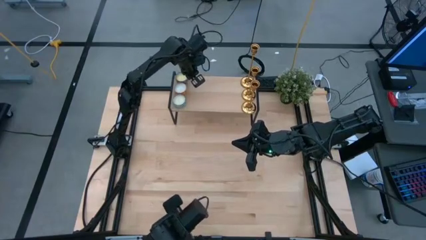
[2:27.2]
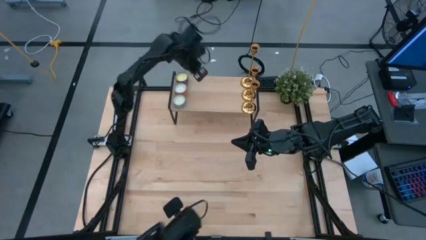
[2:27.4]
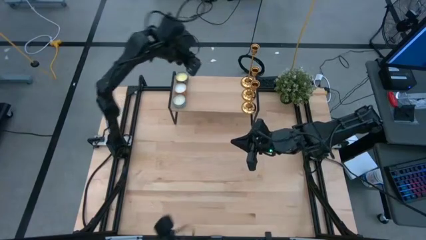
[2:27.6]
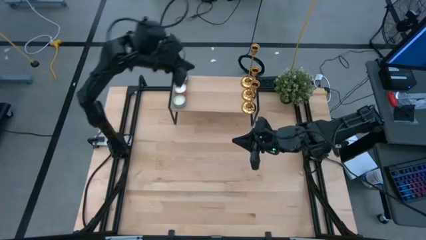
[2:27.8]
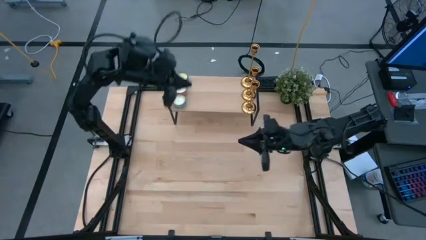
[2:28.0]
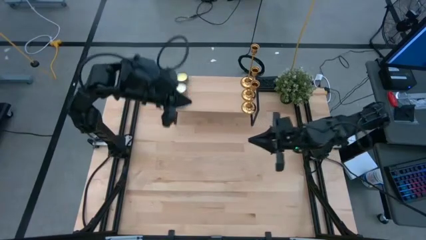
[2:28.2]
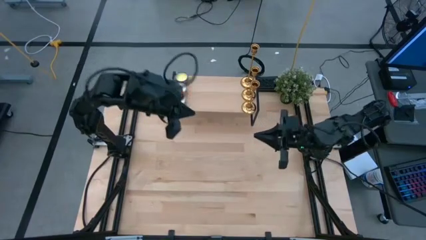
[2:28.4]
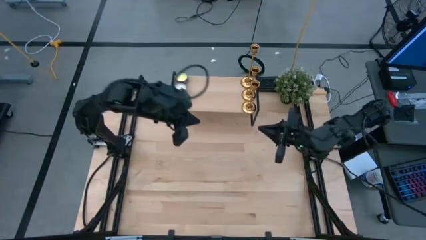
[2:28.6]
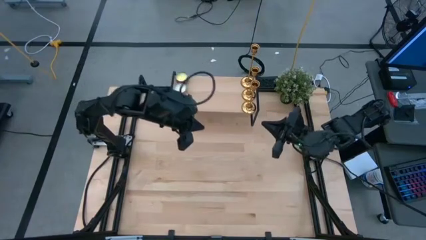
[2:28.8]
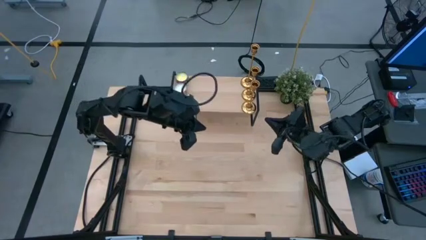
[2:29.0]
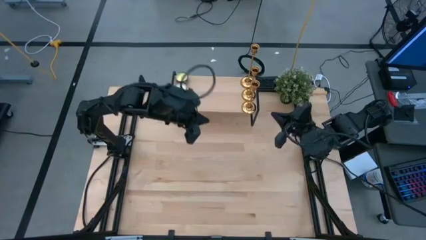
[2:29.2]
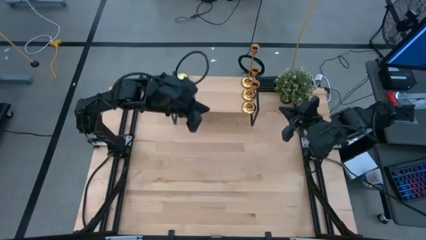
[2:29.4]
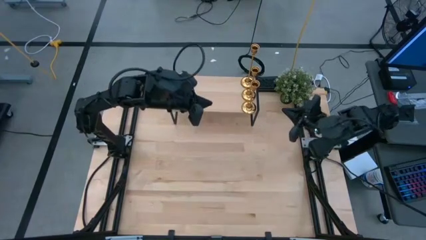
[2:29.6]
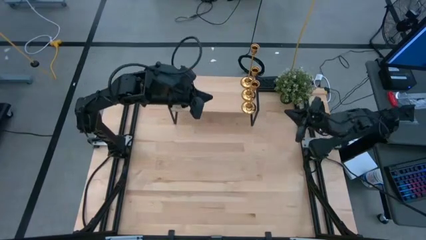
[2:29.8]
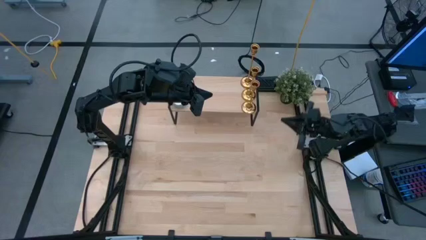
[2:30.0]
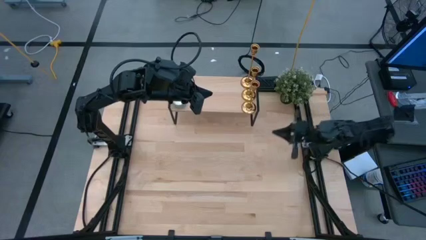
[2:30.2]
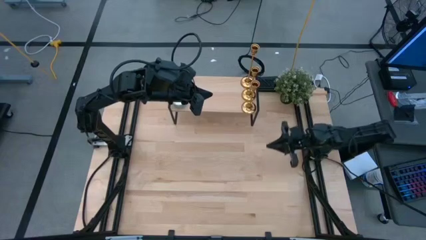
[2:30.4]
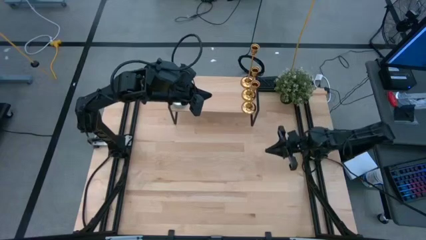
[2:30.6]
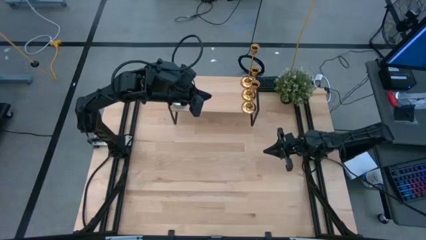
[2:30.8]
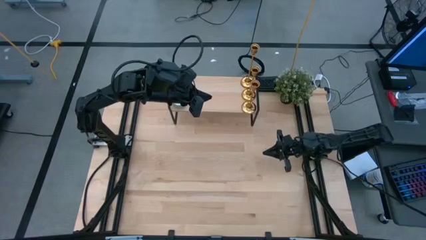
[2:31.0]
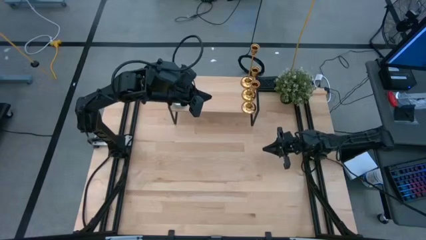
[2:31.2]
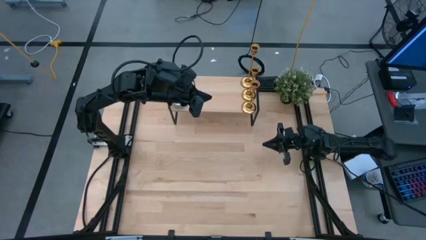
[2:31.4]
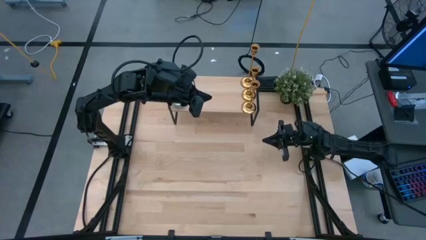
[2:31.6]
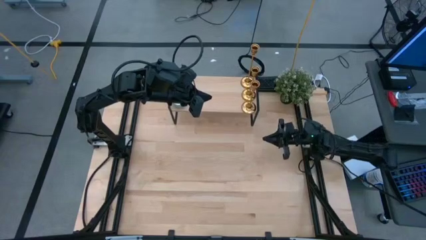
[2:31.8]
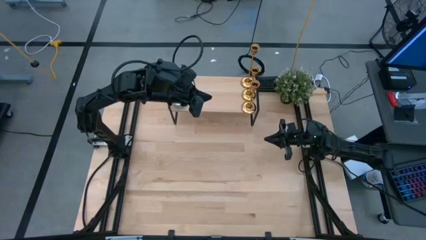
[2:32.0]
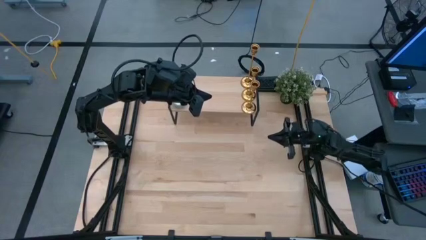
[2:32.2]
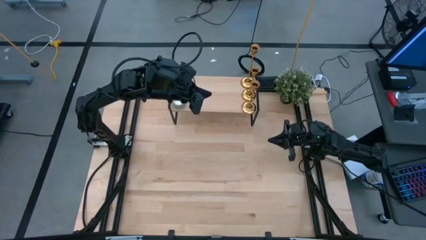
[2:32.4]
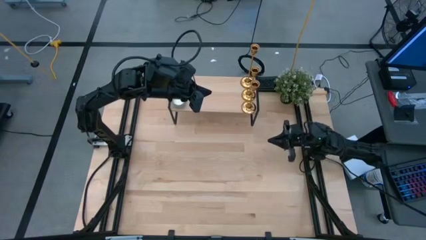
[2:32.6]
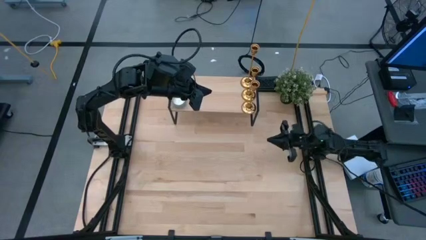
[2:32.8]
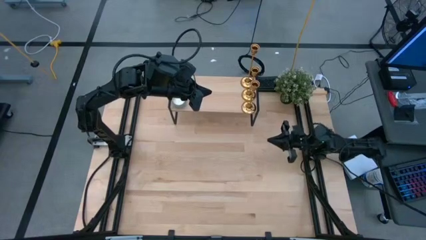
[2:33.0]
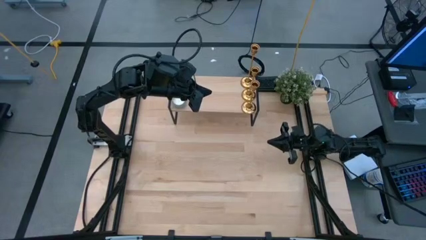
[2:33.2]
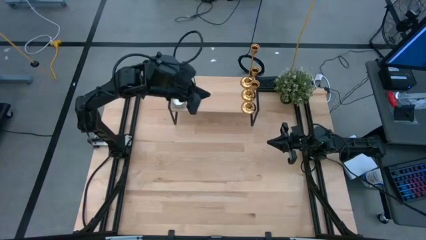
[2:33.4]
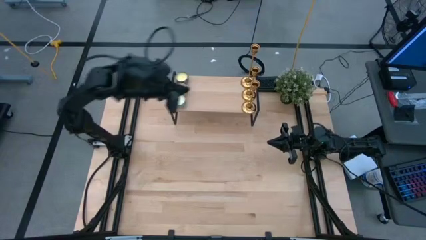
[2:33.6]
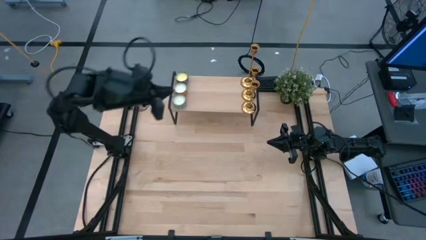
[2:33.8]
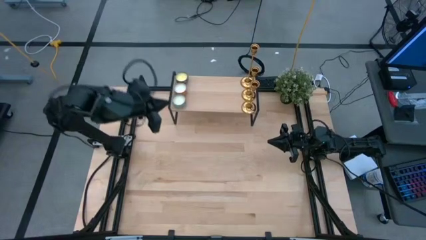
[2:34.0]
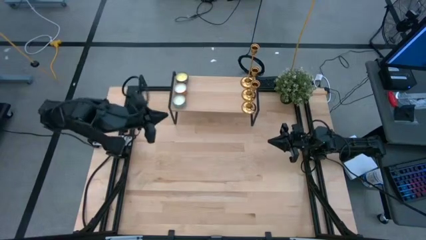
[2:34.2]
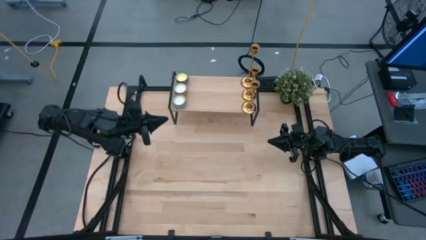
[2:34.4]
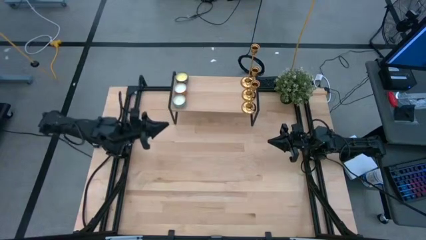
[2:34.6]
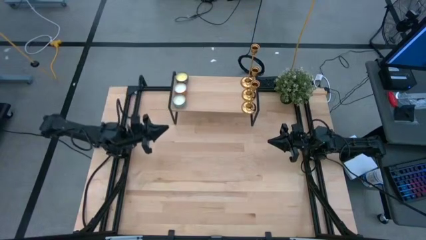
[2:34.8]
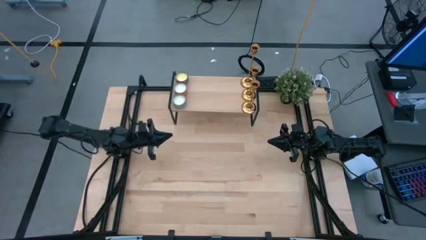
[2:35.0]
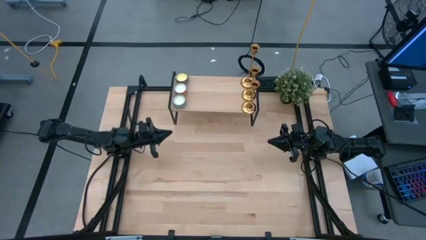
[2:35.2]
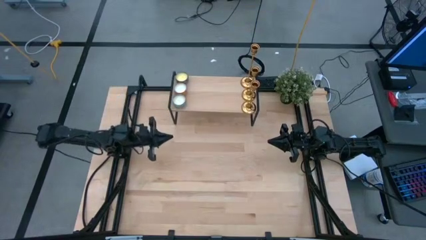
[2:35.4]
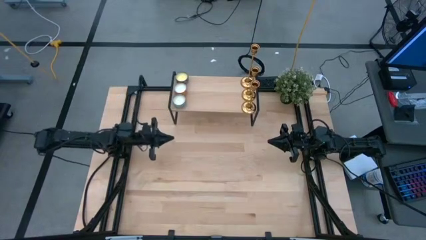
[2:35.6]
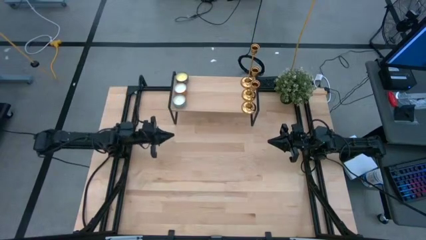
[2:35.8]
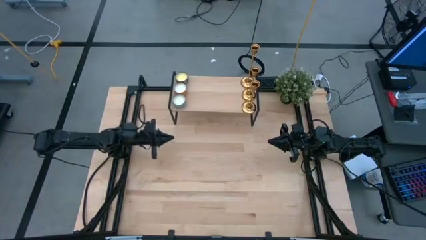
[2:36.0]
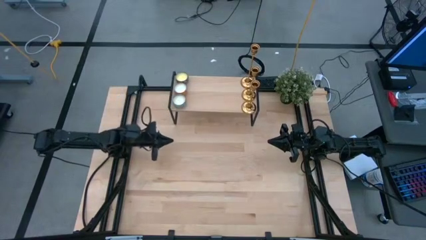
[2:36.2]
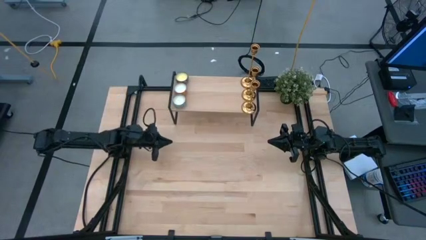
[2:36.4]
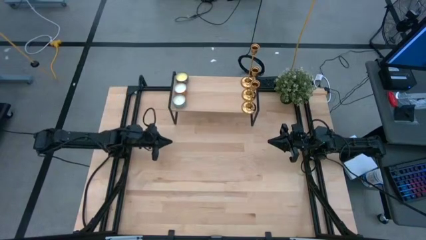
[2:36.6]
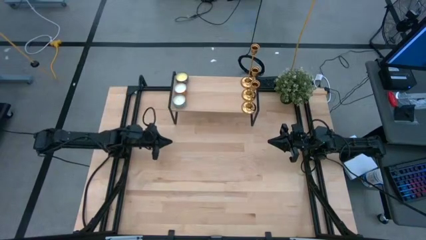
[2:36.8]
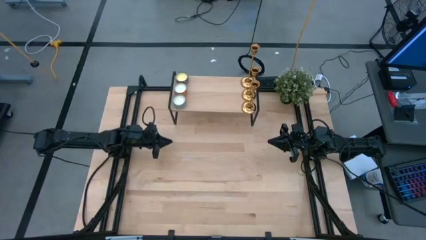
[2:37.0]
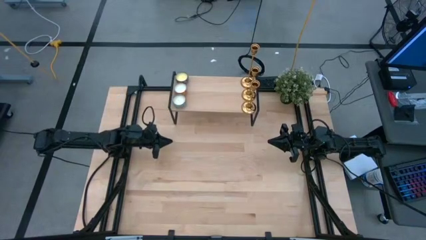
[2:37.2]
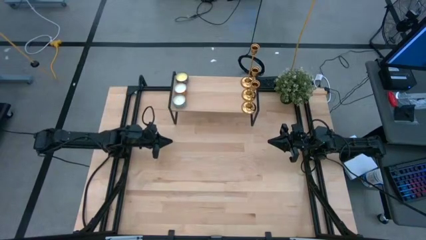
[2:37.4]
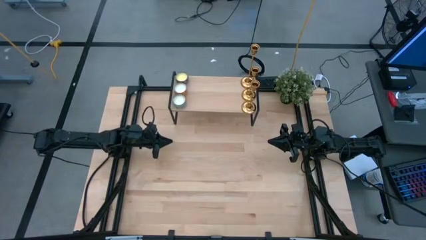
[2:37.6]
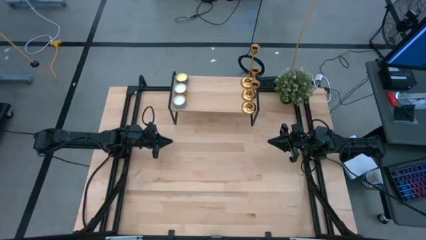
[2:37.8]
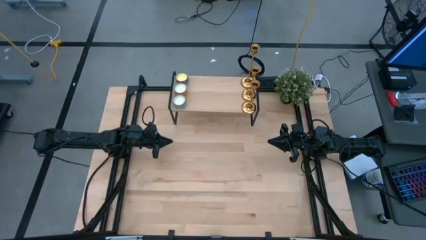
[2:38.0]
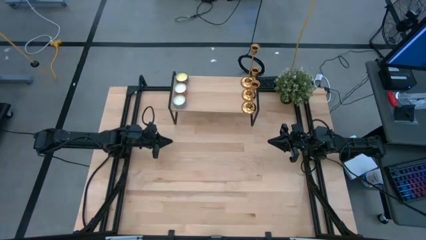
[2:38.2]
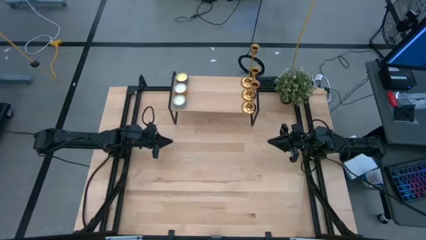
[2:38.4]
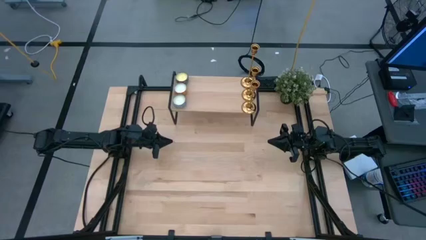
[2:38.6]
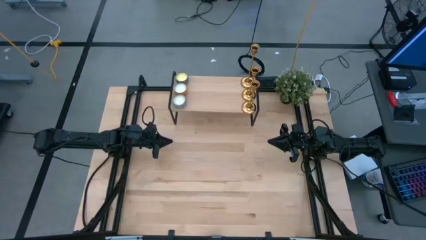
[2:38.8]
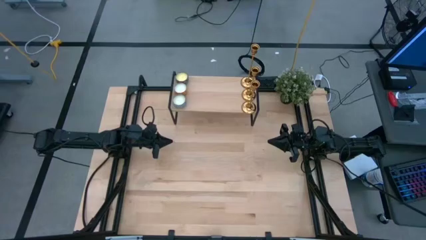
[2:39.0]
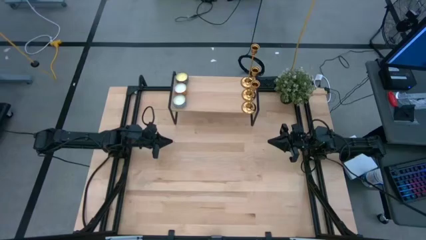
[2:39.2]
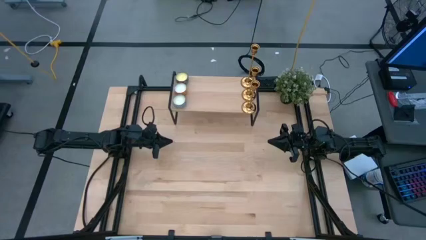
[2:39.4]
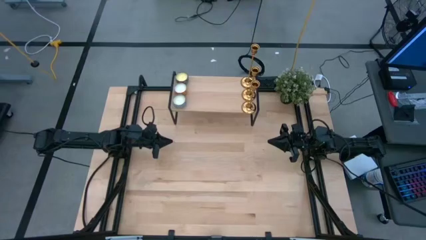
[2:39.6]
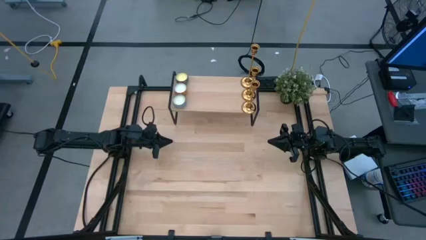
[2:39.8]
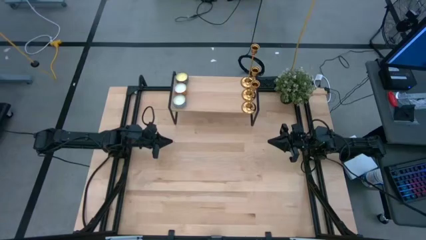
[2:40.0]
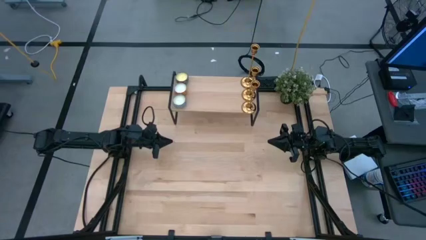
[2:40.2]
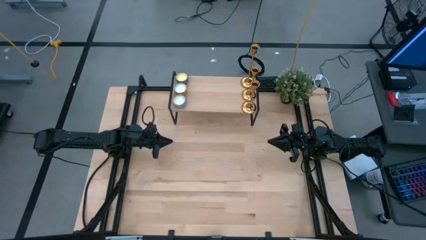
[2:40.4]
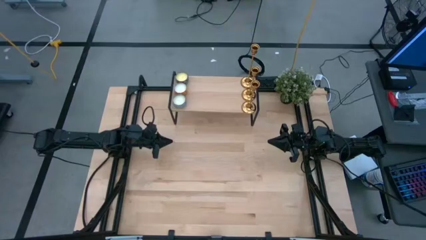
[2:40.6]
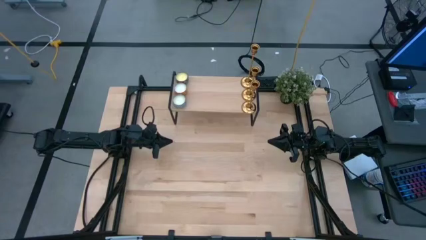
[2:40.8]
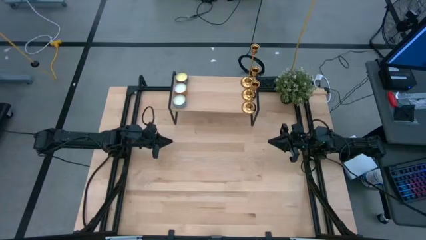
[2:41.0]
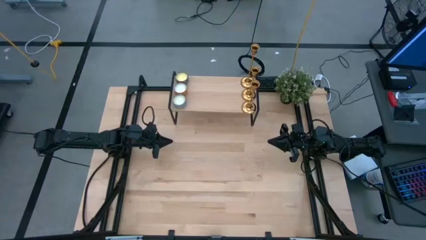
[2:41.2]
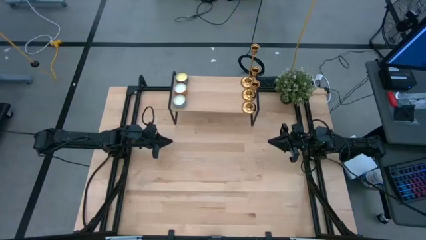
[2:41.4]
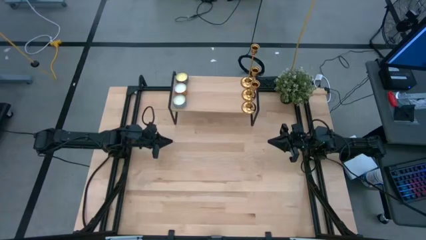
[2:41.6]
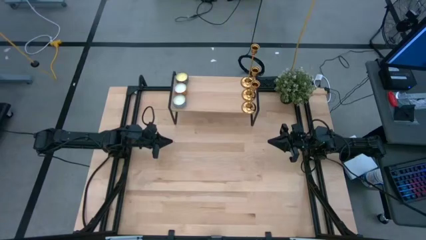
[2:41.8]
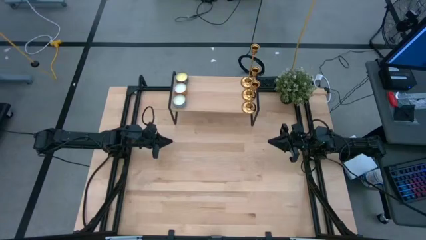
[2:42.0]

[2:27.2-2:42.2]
Task: Pick & Place candle stick holders
Return to Home Position
